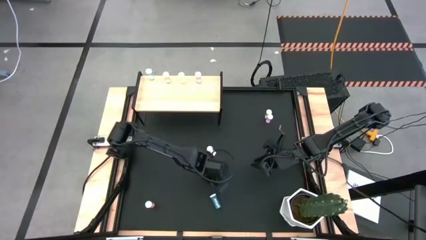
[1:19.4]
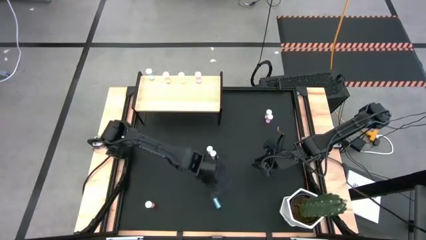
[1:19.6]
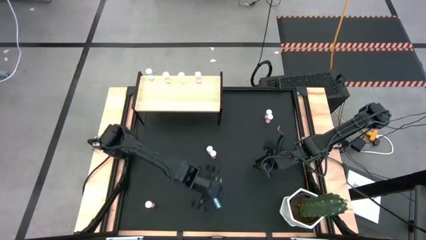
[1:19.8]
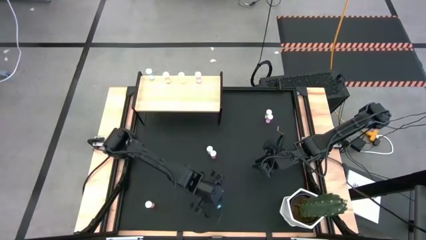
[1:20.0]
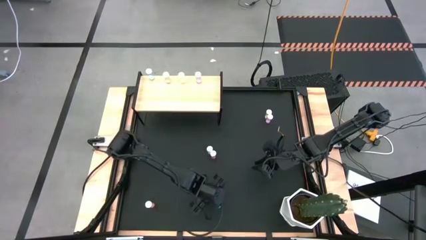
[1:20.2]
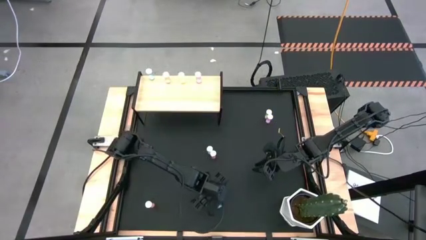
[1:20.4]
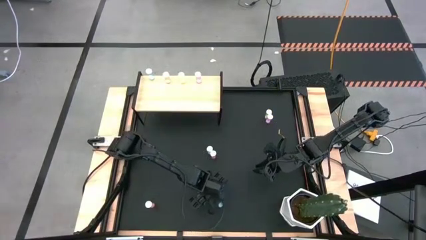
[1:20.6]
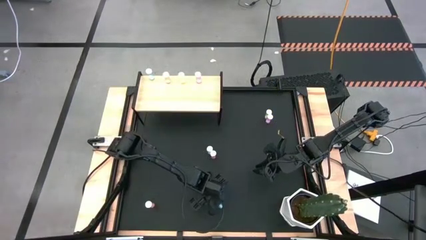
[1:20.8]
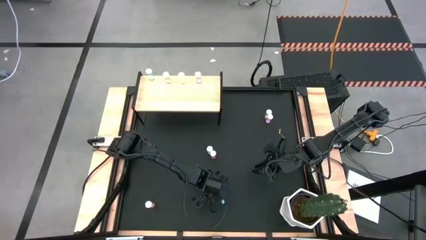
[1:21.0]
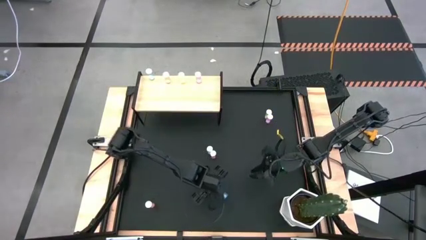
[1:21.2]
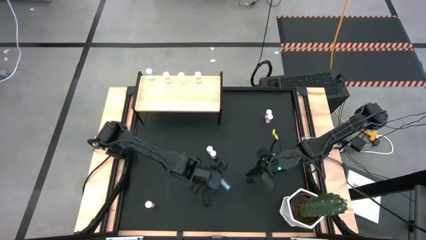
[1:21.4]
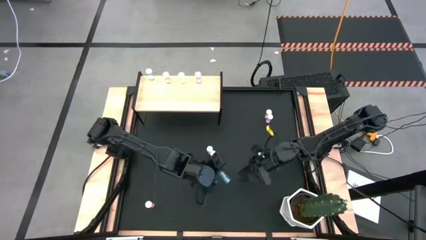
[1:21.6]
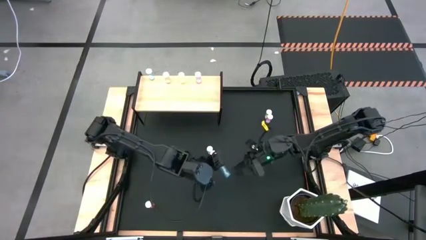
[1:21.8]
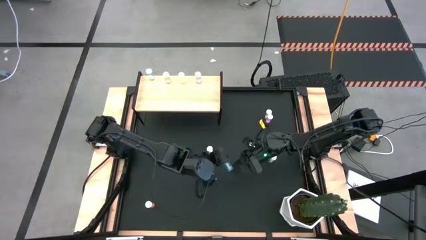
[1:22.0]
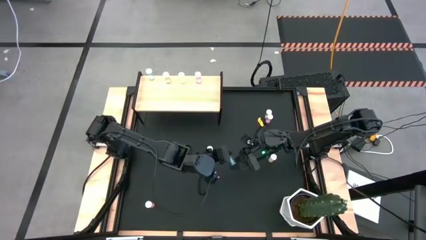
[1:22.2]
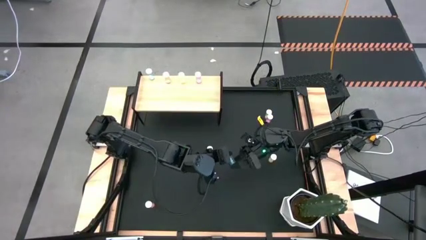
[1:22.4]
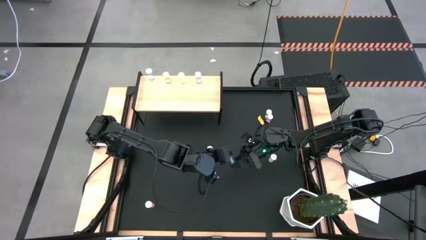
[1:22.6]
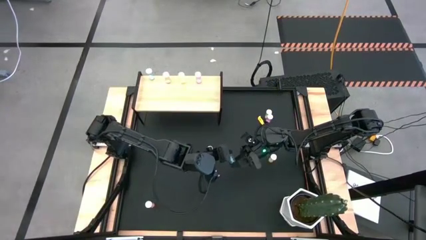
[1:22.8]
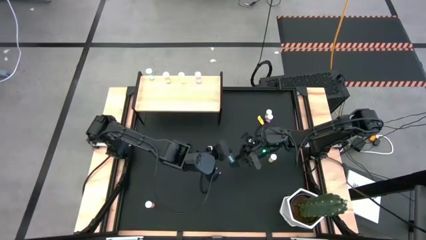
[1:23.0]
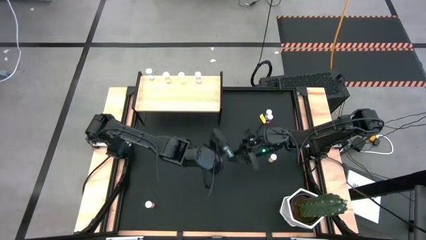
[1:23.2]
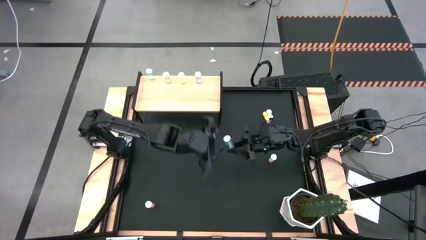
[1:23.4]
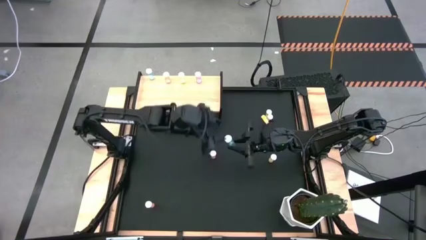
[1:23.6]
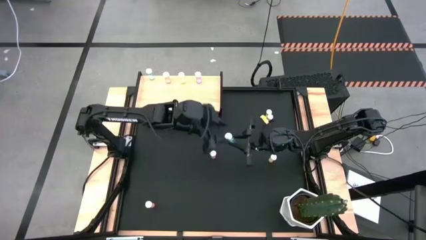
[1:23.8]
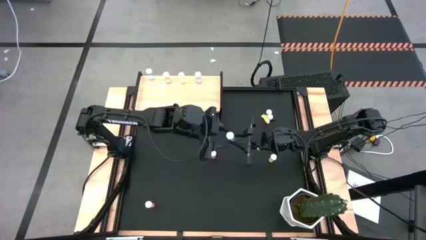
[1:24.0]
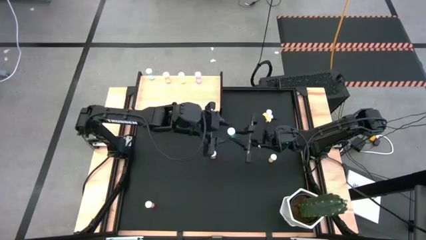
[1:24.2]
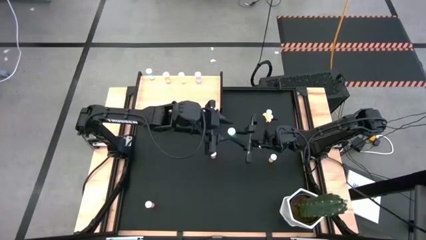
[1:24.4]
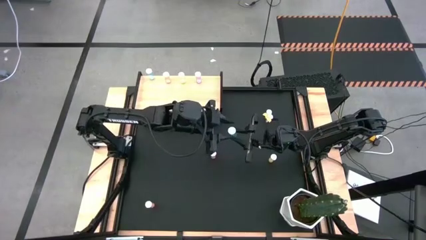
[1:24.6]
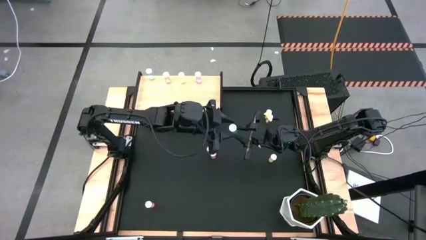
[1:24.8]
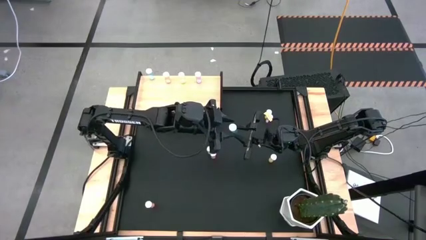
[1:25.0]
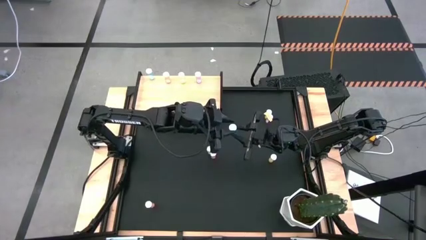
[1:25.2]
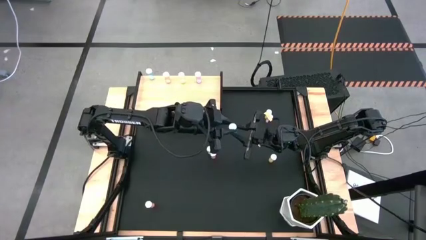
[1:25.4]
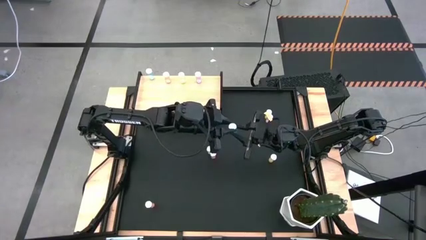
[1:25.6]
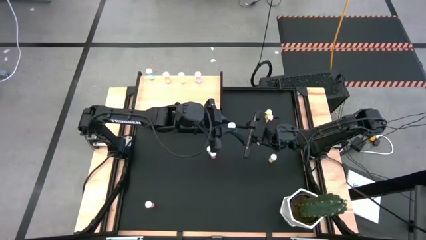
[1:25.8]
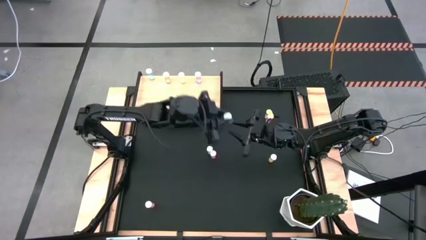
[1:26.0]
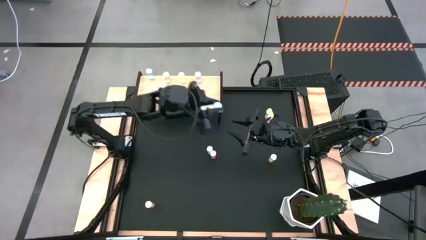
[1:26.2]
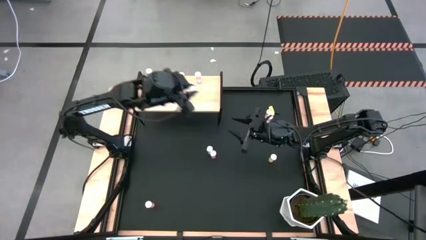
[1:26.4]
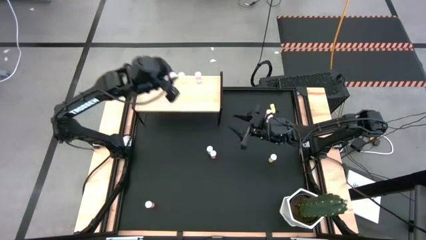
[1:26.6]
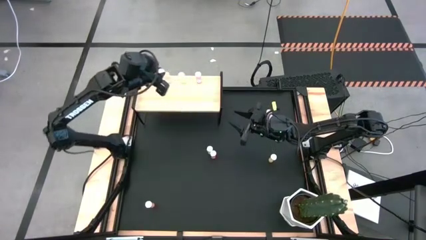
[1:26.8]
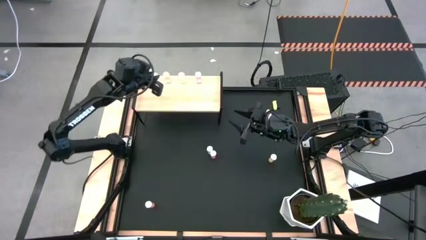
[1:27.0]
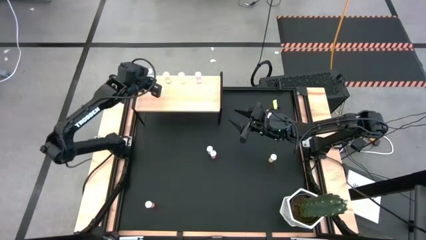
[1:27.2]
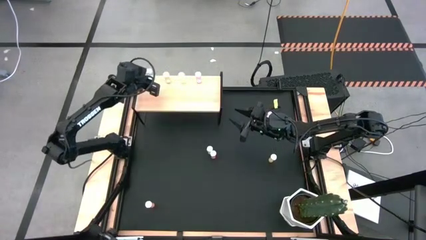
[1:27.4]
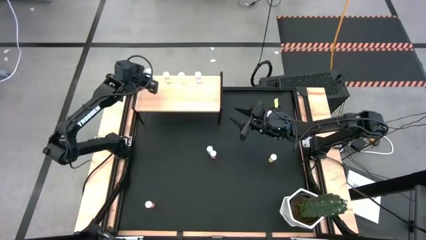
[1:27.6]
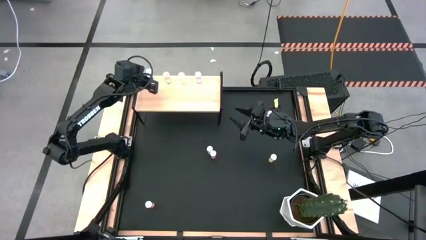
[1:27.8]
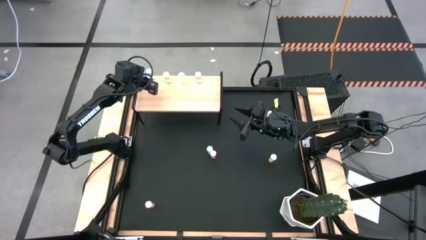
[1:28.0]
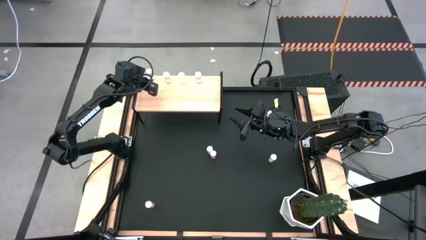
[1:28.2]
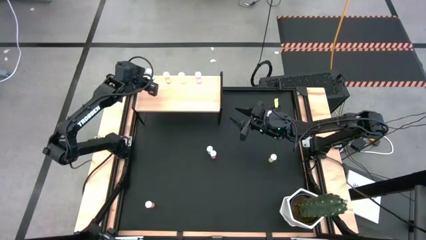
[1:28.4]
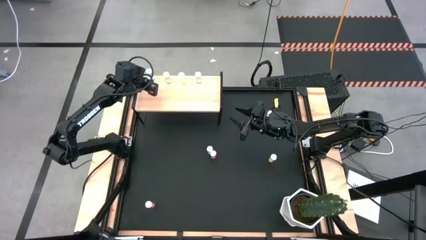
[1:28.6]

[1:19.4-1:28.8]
Task: Pick and place medicine bottles onto shelf by color
Put the bottom blue pill bottle on the shelf aligned with the blue pill bottle

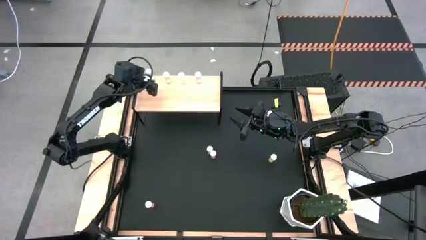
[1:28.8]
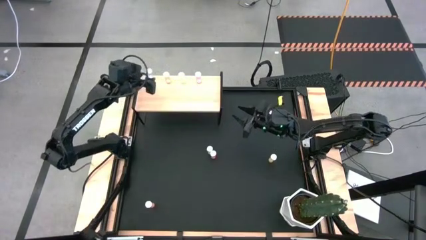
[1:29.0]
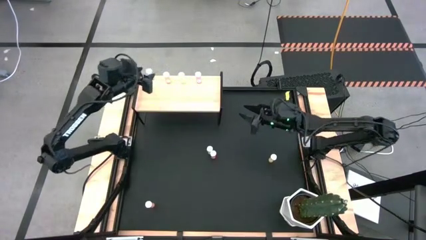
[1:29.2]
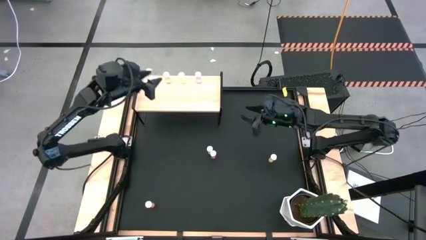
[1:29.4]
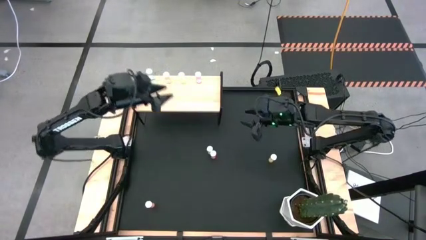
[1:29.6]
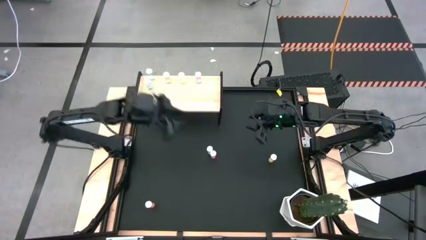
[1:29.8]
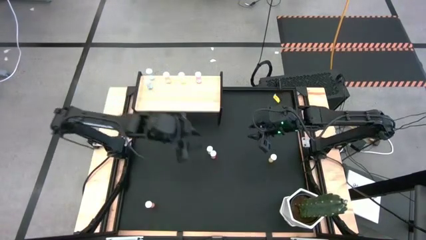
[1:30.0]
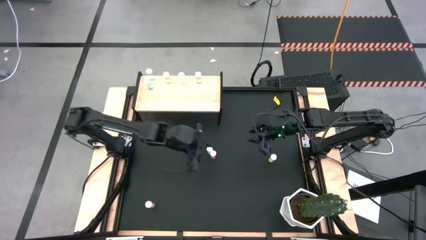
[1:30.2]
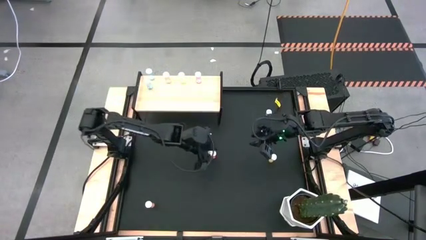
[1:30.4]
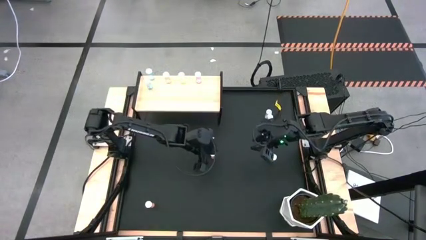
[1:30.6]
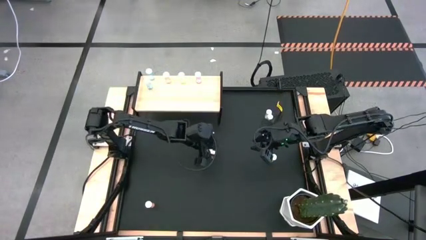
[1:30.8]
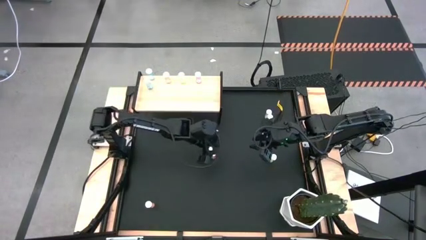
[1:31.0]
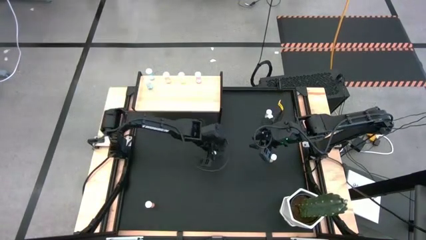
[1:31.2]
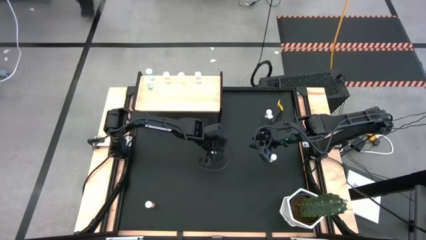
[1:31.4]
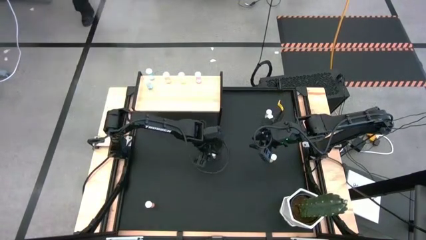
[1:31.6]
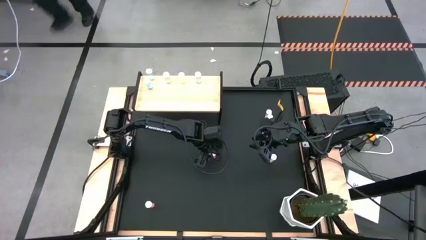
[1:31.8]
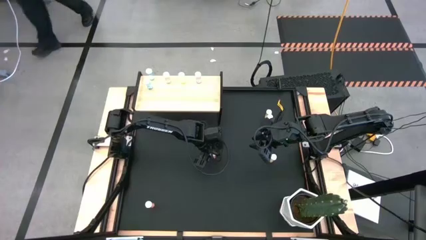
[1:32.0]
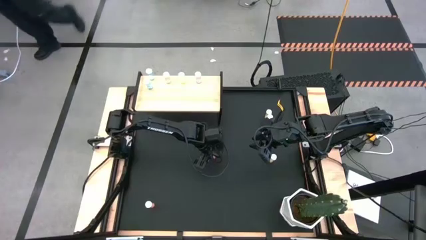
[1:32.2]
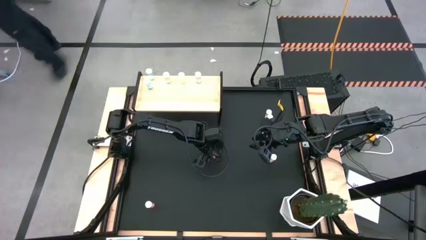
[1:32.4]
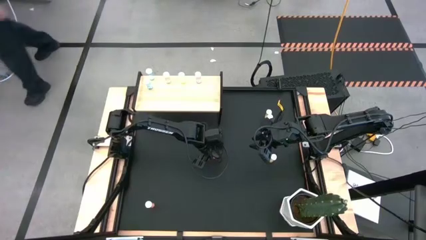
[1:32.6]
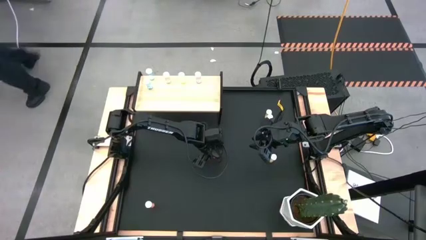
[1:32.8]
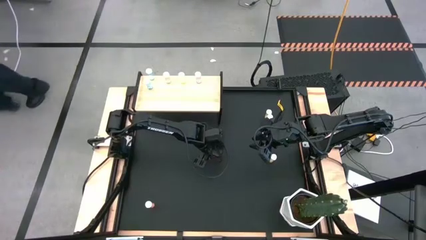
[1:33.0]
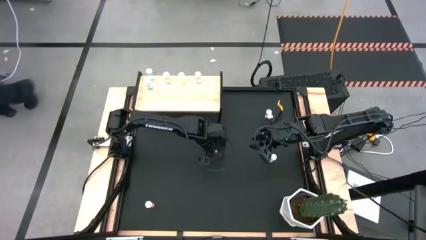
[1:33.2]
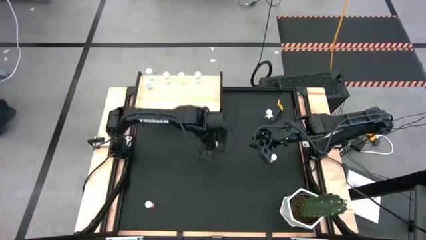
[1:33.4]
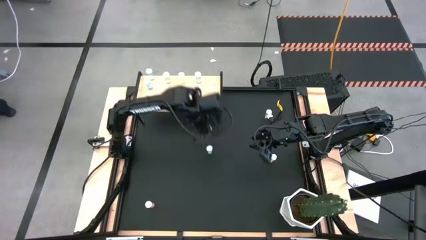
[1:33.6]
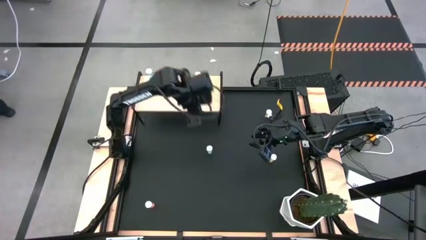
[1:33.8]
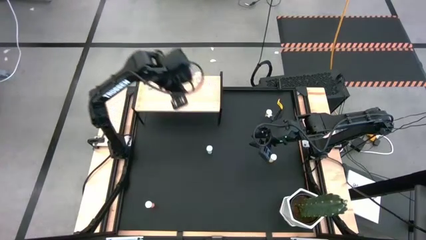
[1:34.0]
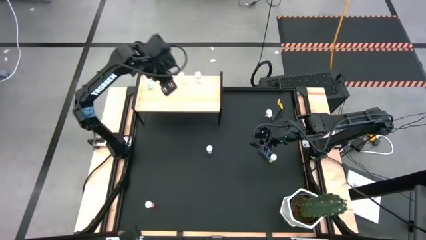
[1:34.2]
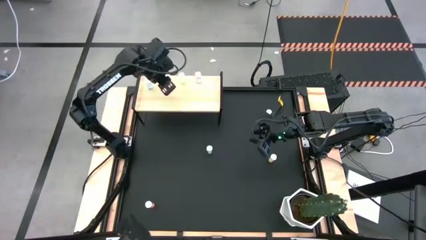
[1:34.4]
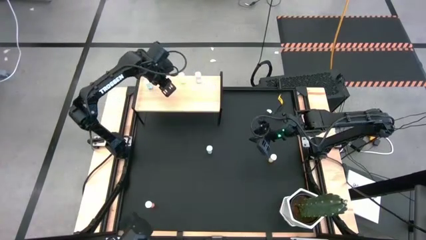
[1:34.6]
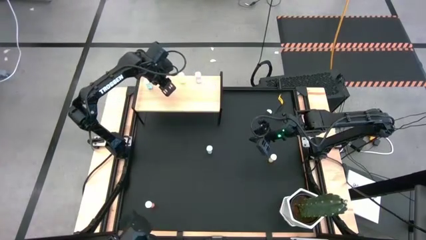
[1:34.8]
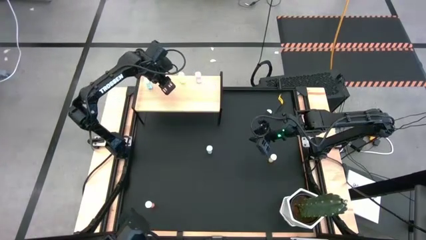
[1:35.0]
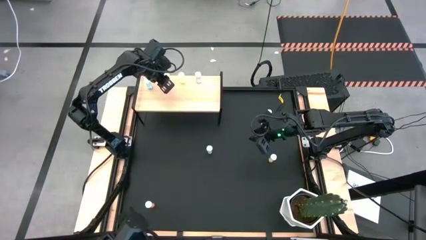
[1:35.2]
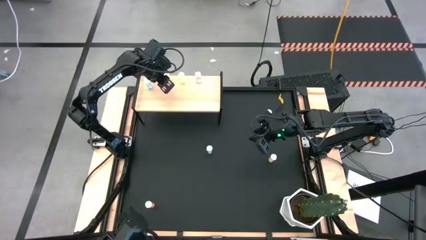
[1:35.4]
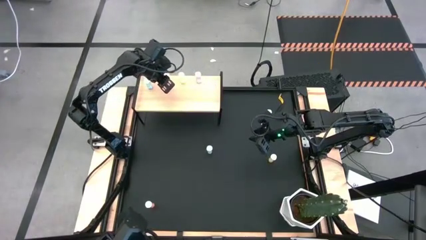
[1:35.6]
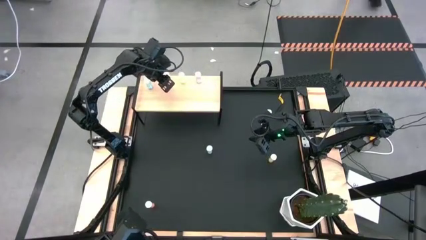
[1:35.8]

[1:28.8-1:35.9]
Put the top red pill bottle on the shelf aligned with the red pill bottle
